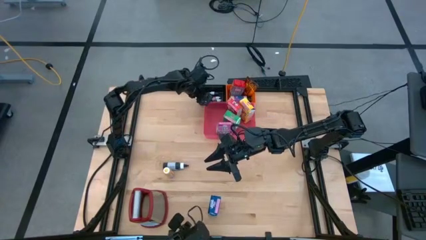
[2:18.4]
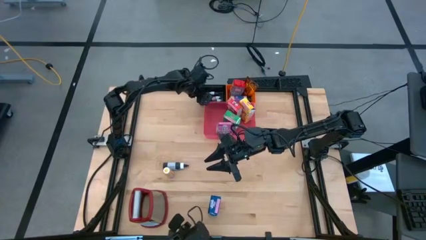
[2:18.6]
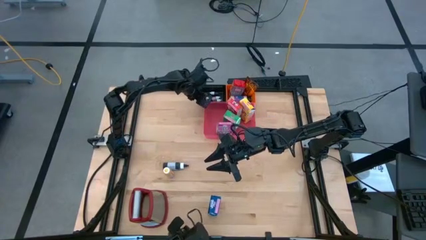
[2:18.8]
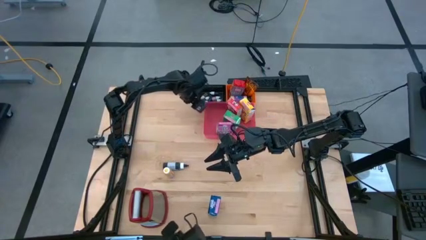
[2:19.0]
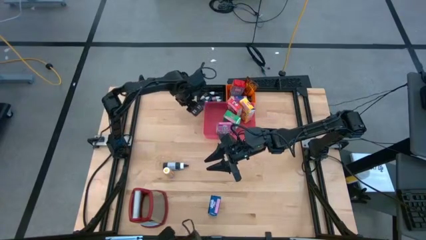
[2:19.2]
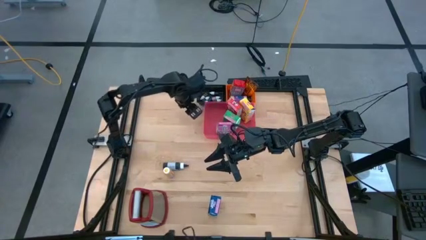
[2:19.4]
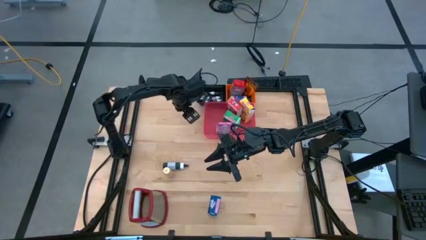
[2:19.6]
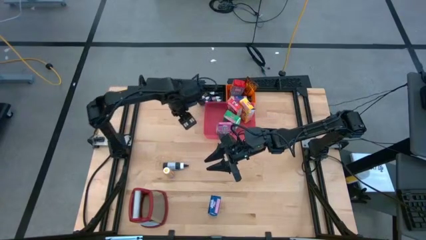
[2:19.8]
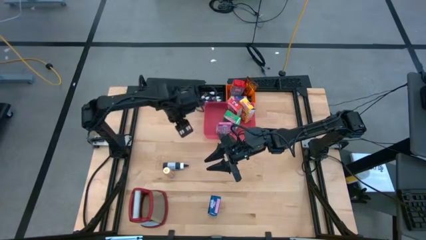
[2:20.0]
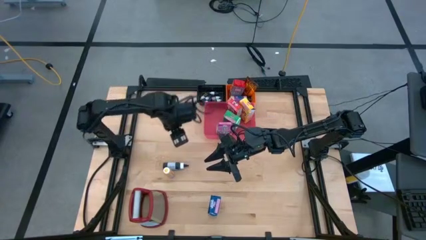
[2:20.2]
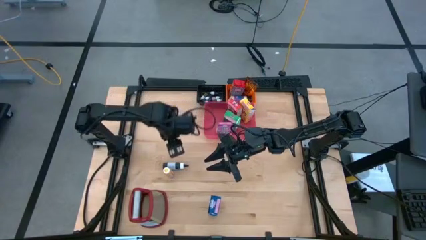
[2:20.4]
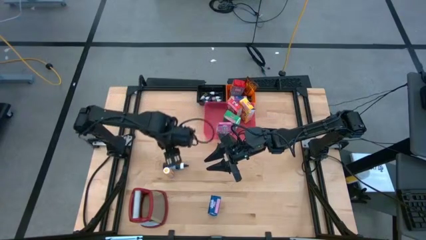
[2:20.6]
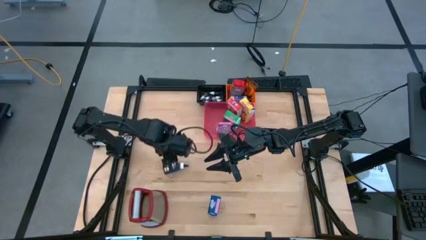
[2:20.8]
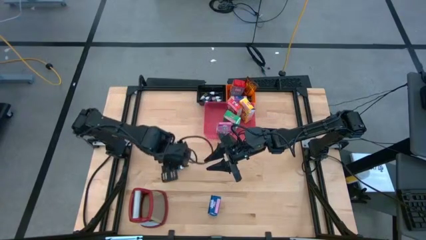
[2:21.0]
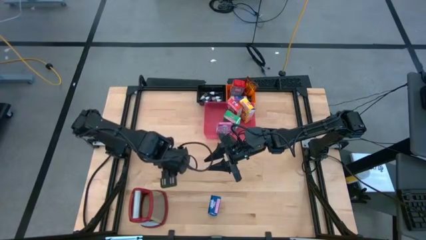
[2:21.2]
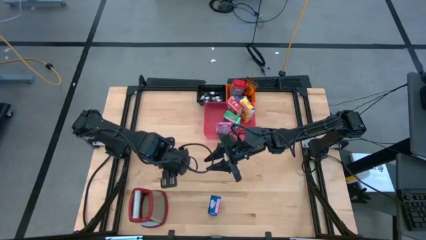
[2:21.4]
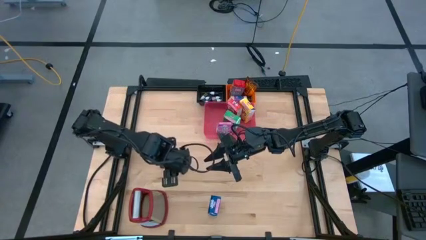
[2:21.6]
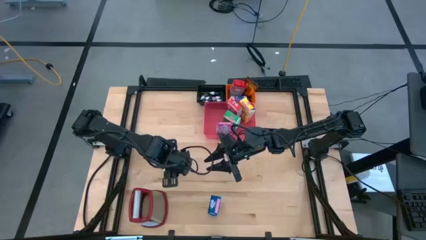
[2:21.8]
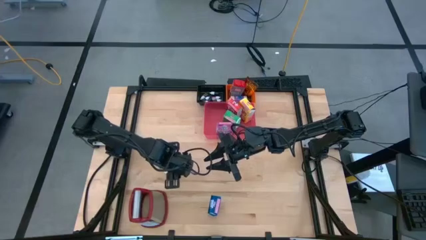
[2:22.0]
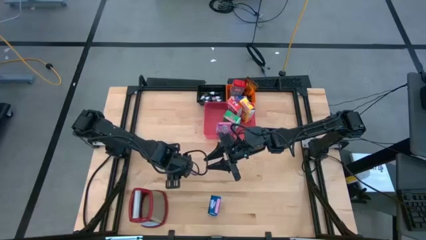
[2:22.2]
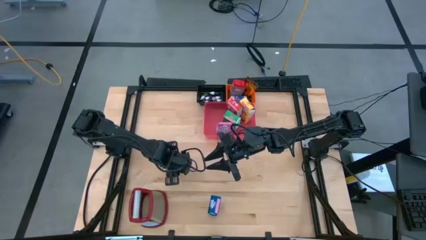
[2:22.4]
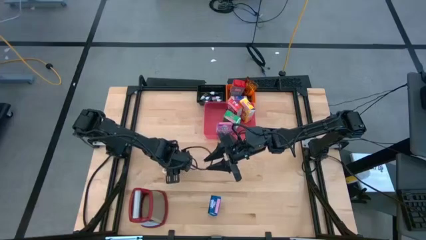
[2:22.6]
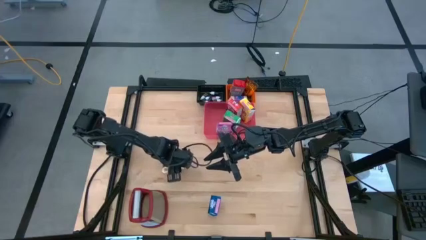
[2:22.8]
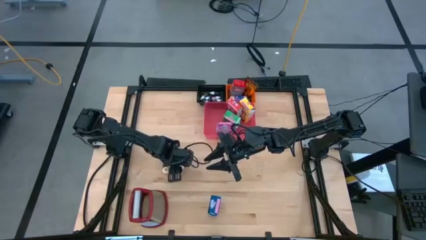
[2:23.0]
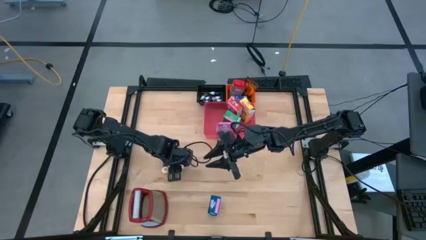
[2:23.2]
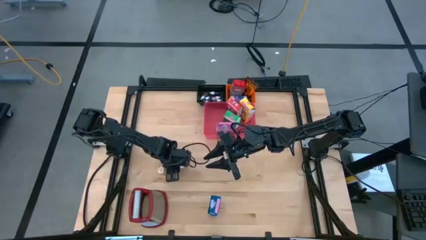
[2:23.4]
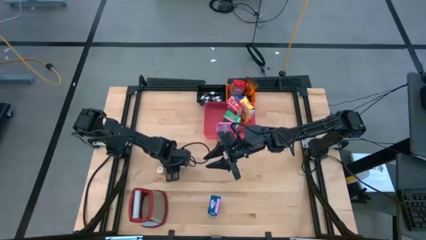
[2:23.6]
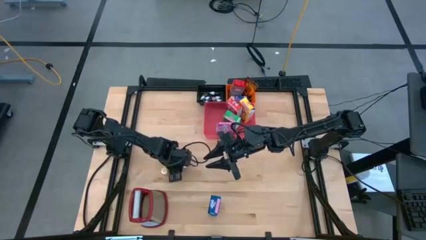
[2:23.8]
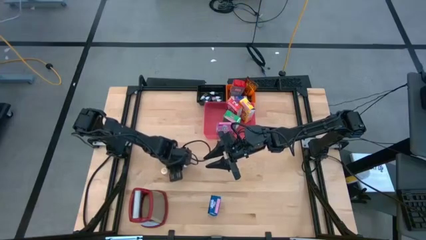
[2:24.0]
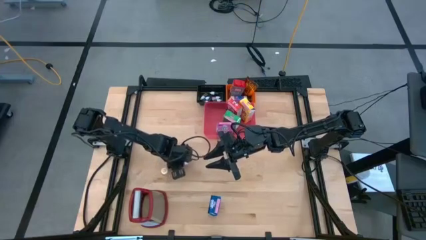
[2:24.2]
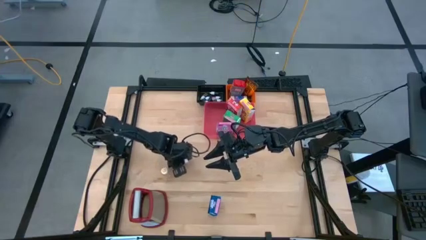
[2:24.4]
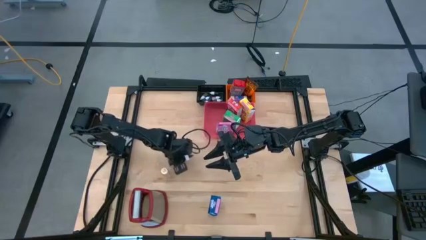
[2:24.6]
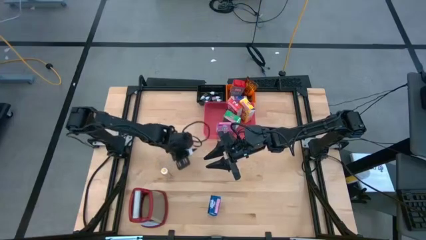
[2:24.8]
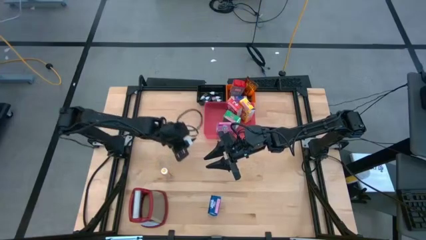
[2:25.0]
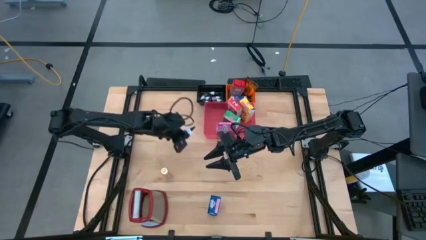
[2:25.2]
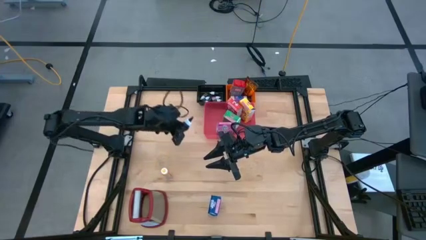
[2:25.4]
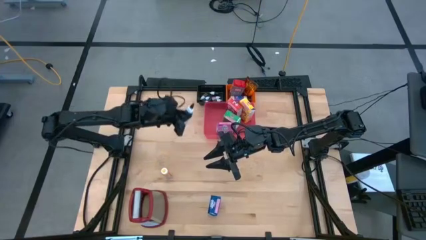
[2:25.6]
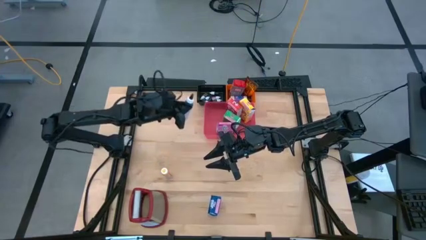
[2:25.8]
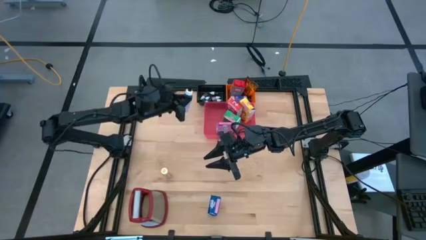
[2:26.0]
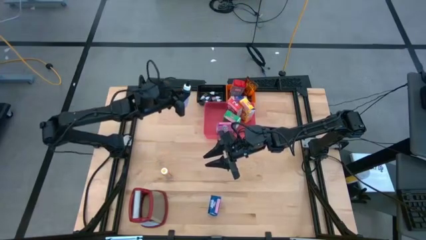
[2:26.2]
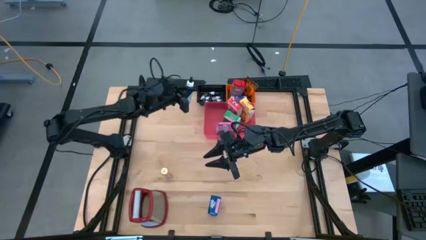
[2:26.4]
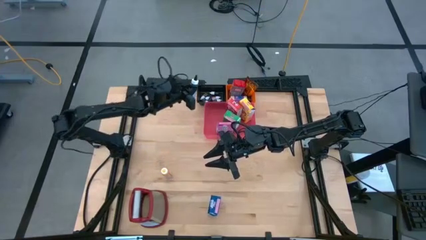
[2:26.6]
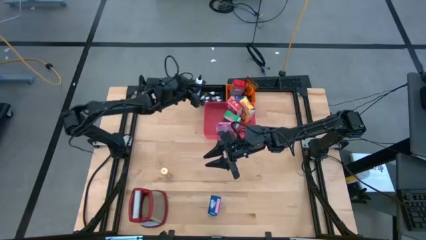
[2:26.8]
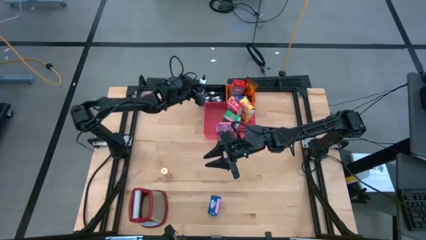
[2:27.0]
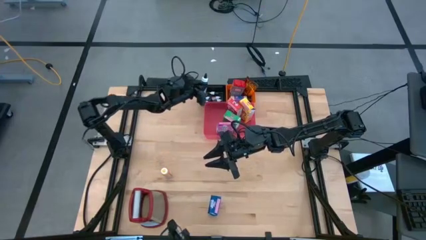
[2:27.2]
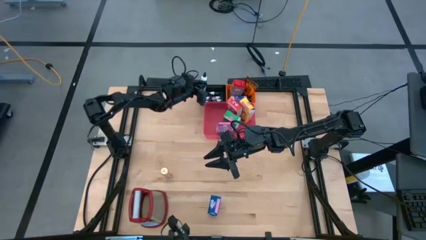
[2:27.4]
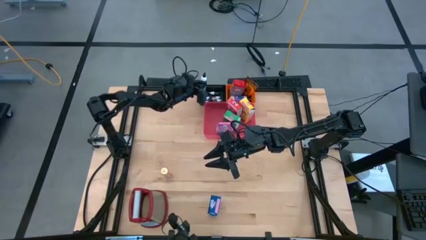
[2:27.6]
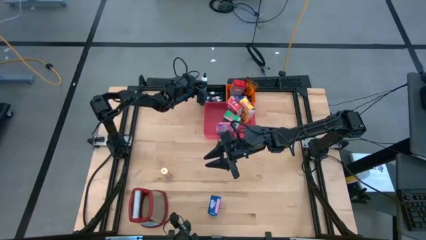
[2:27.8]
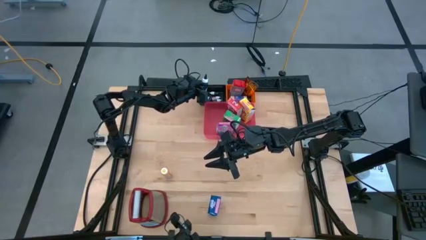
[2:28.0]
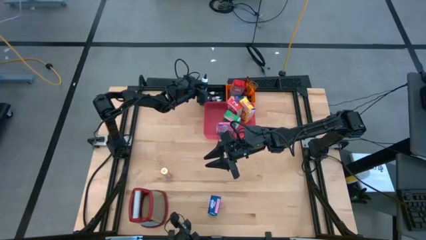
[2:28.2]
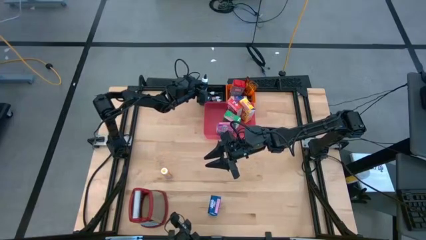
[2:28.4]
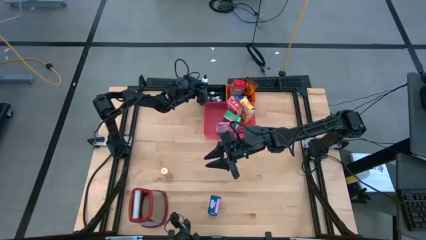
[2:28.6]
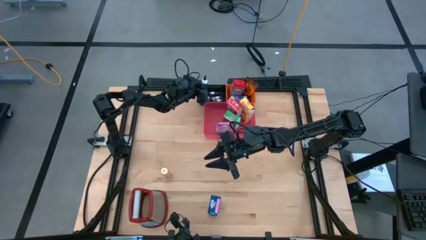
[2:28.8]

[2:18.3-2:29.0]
Task: Pick & Place Kitchen Items
Put the large black food coloring bottle into the black bin
